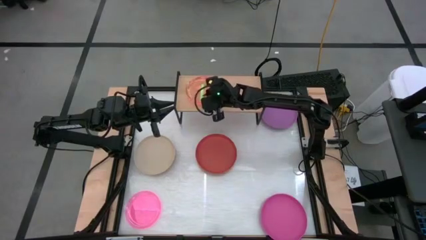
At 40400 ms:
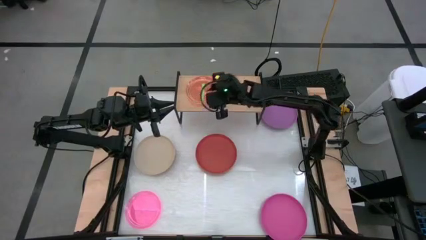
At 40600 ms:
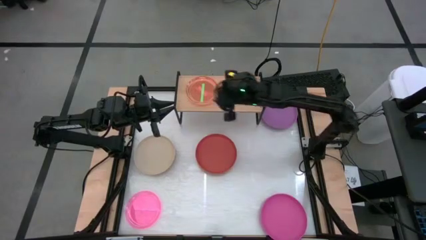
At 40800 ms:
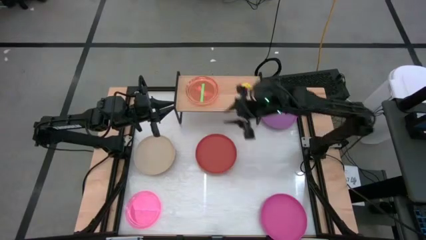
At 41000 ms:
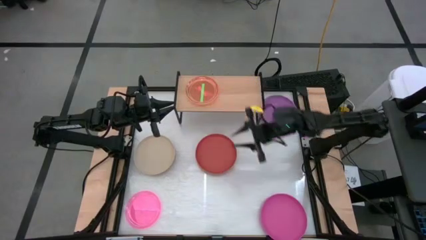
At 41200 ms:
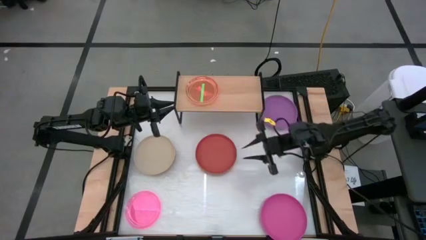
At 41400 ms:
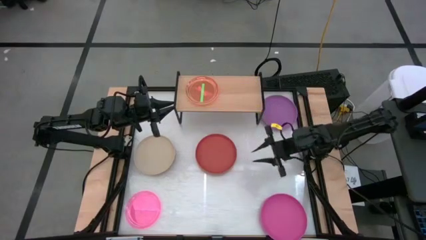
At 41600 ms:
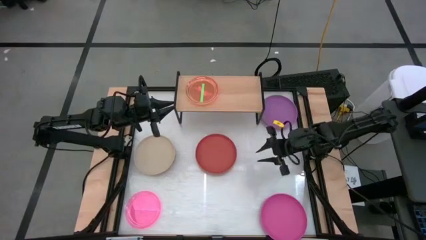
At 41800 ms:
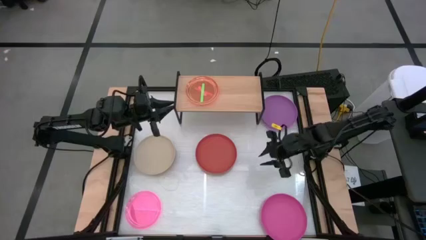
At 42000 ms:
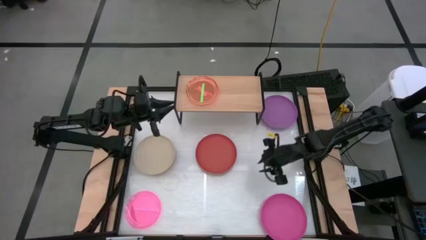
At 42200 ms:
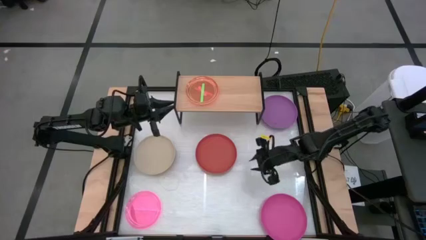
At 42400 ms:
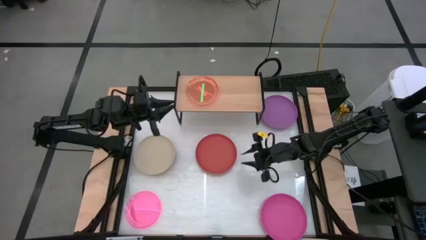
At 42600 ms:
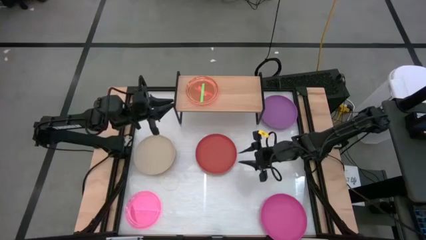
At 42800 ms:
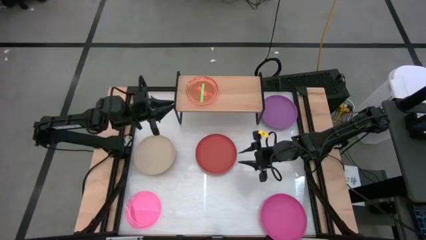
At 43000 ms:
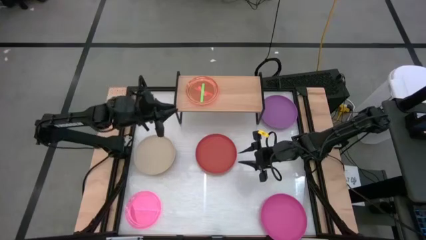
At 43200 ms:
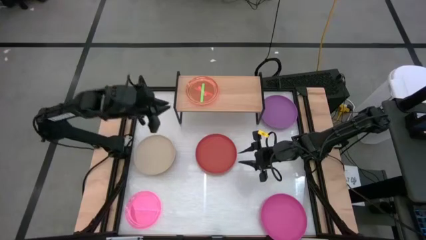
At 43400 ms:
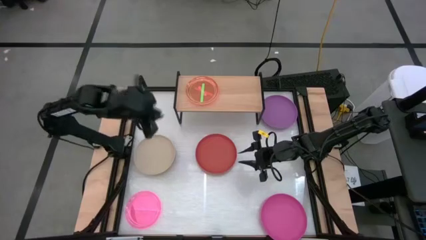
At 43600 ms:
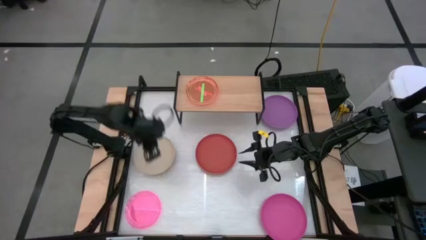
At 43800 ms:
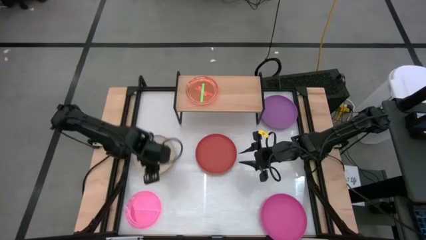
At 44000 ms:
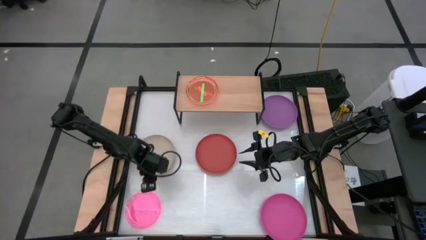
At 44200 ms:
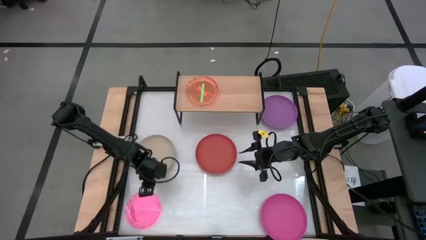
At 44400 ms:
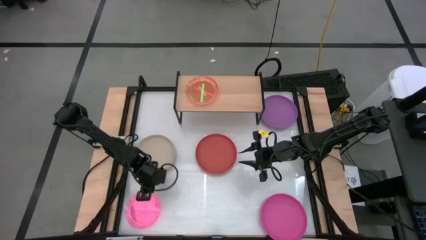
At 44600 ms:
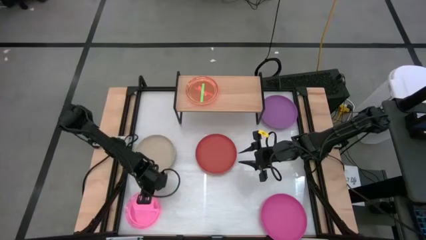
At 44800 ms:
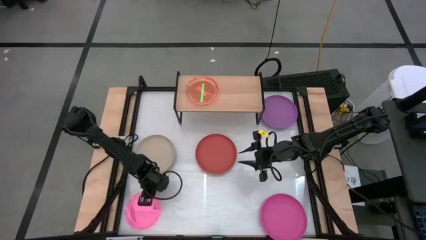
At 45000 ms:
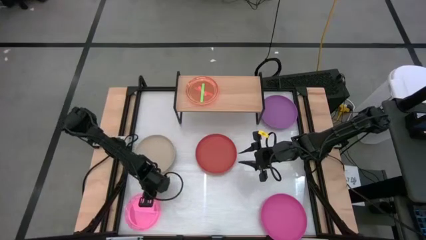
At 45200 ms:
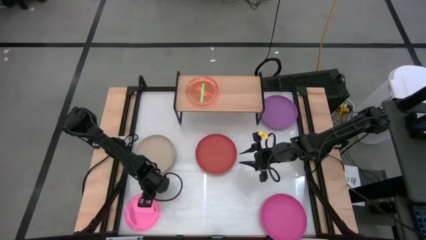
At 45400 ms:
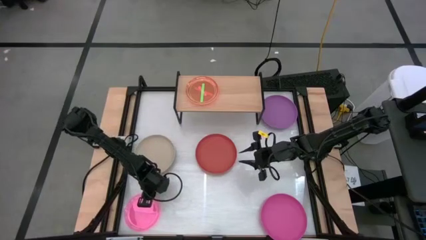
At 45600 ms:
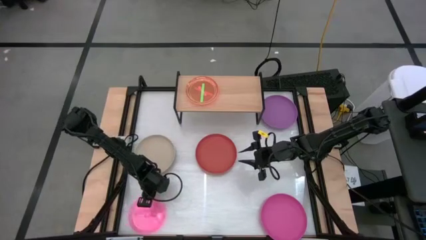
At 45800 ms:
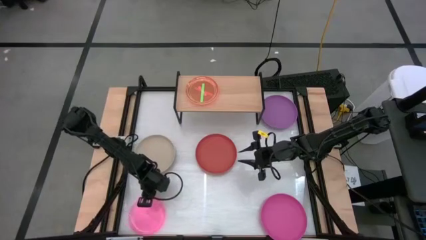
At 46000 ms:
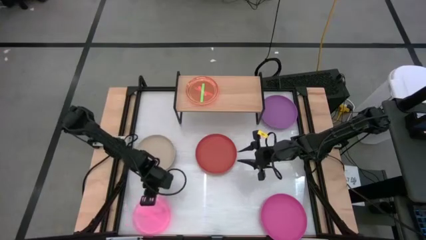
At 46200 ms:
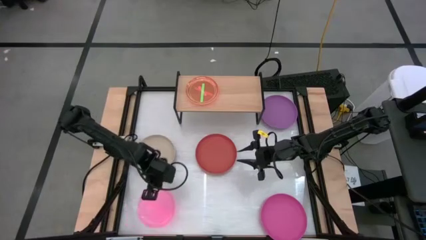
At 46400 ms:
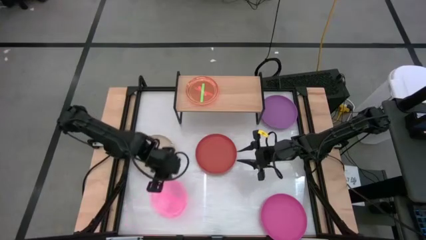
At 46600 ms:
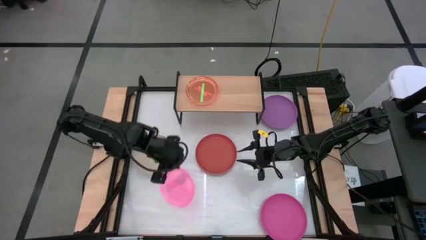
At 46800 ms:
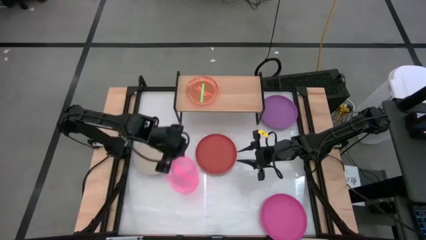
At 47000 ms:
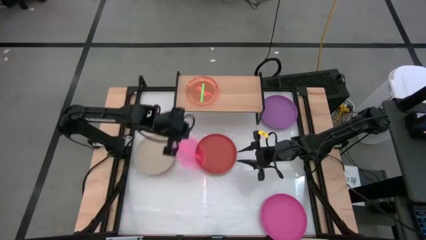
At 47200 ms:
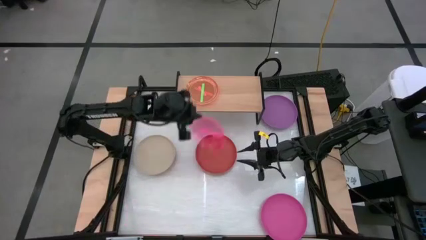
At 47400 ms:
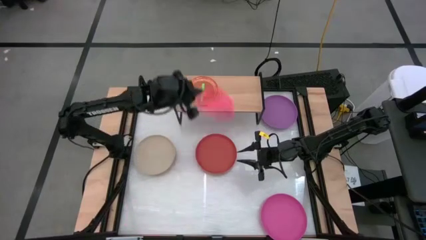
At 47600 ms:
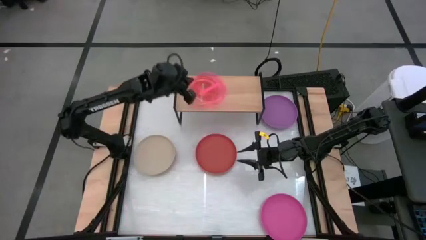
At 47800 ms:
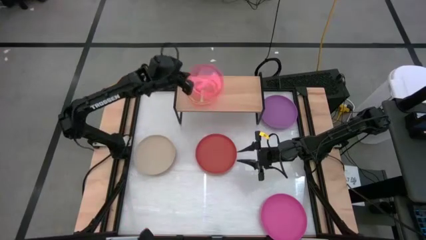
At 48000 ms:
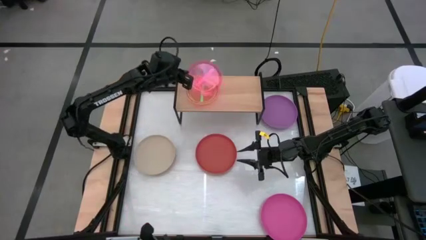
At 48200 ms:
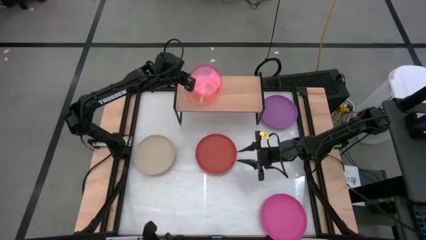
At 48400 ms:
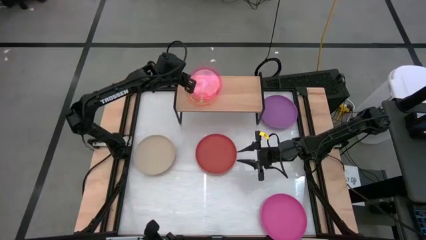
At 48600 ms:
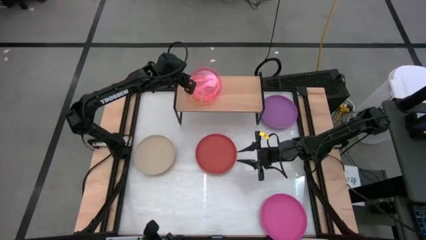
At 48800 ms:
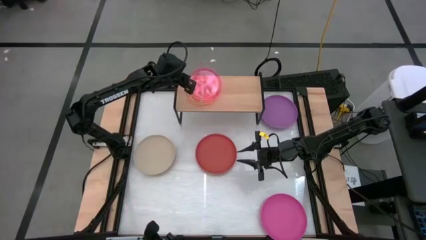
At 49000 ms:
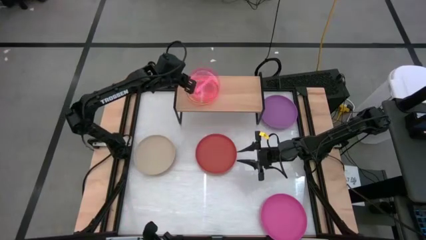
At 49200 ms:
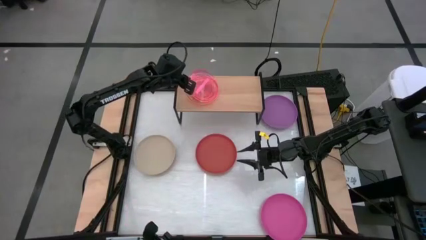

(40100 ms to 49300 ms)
Task: Place and stack plates onto a shelf
Stack the small pink plate on top of the small green plate on the shelf

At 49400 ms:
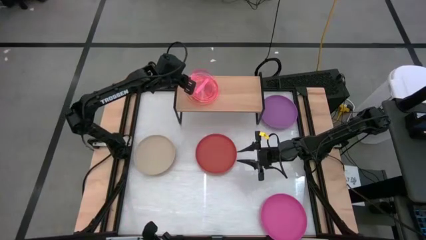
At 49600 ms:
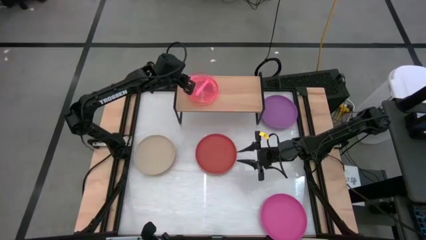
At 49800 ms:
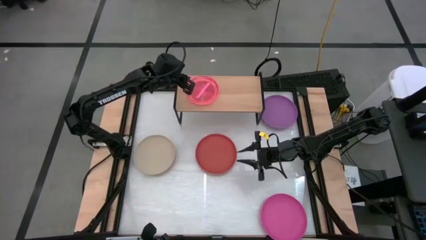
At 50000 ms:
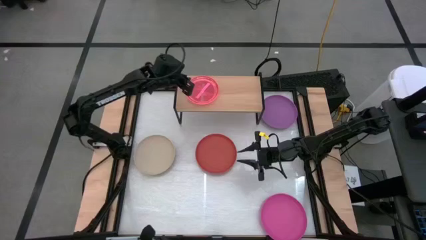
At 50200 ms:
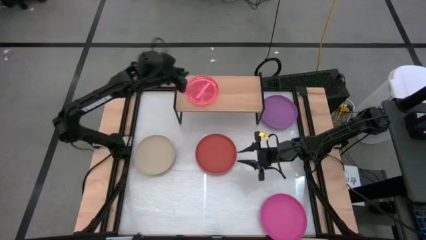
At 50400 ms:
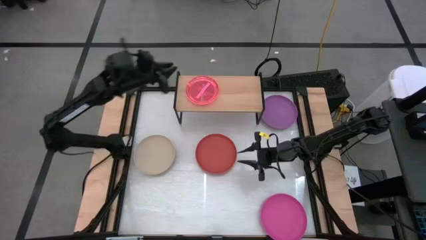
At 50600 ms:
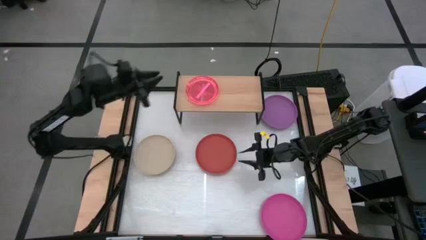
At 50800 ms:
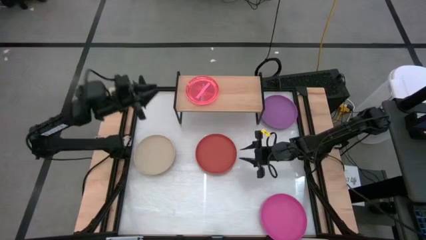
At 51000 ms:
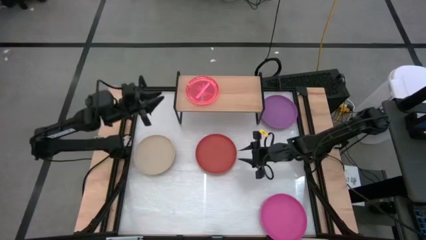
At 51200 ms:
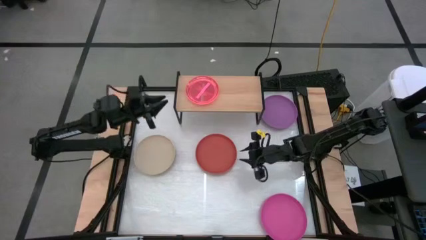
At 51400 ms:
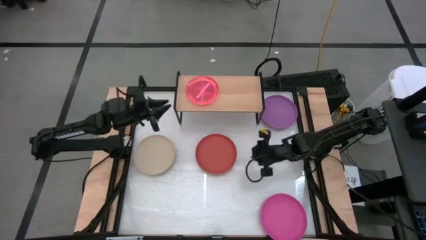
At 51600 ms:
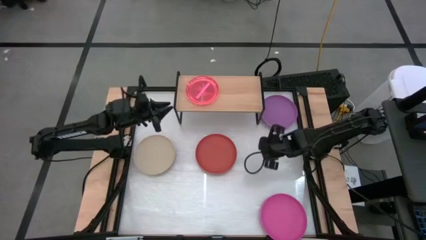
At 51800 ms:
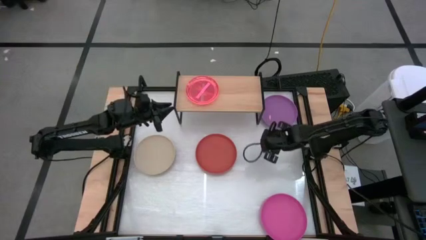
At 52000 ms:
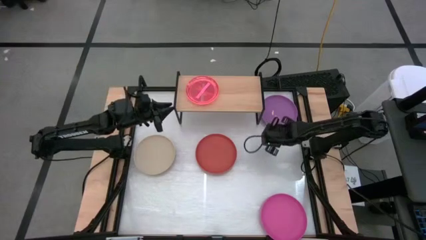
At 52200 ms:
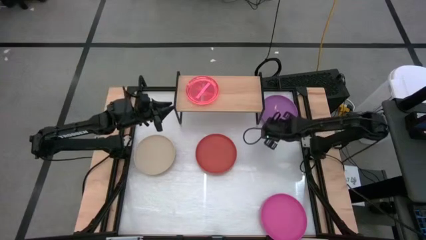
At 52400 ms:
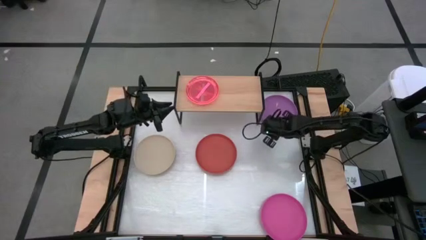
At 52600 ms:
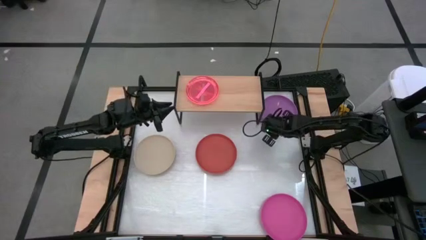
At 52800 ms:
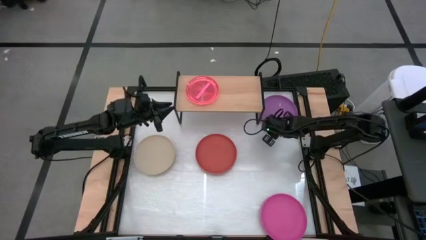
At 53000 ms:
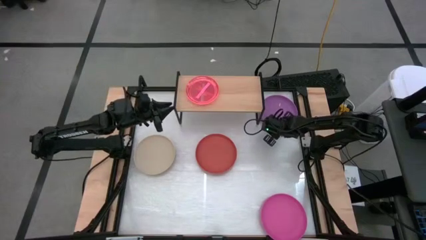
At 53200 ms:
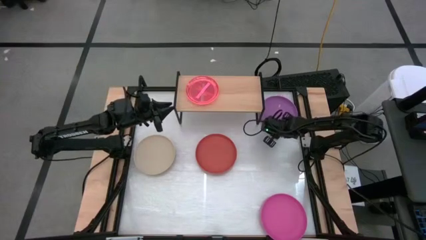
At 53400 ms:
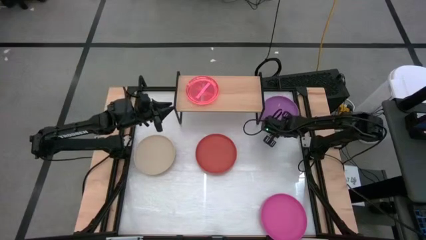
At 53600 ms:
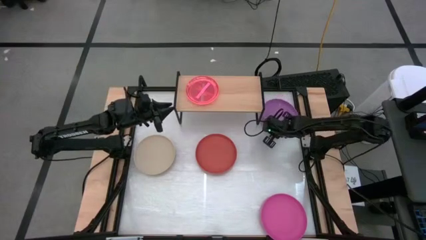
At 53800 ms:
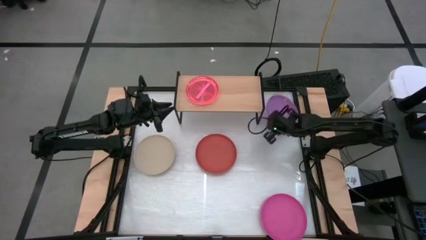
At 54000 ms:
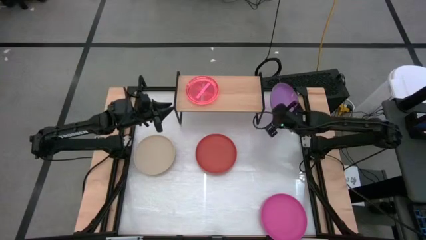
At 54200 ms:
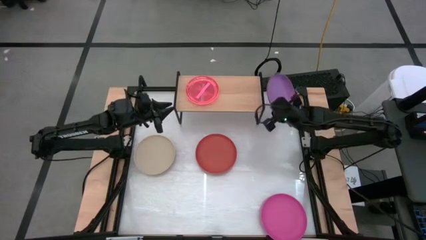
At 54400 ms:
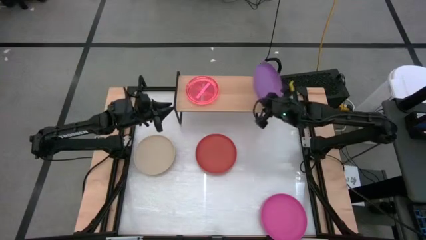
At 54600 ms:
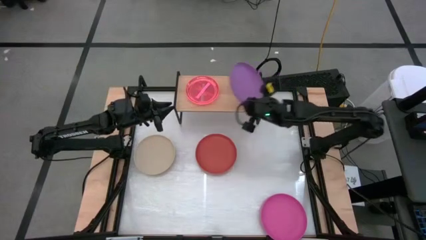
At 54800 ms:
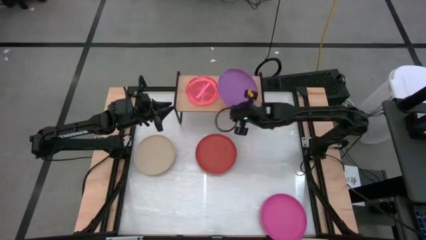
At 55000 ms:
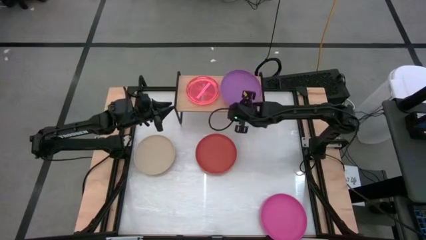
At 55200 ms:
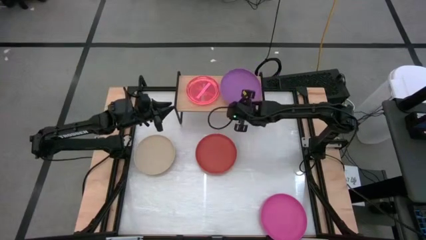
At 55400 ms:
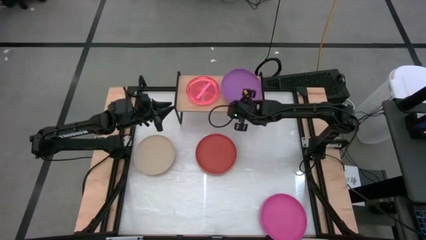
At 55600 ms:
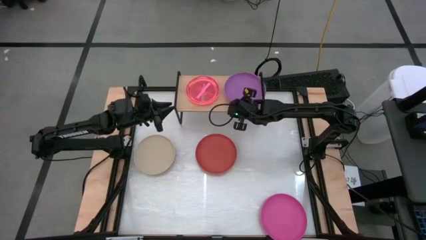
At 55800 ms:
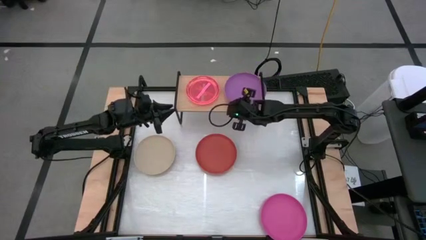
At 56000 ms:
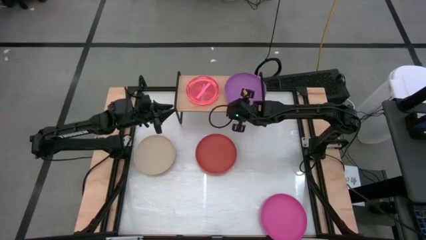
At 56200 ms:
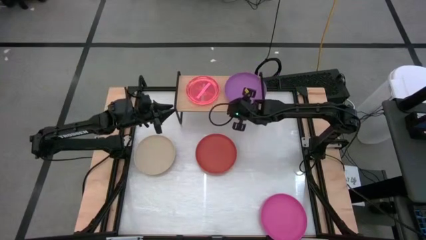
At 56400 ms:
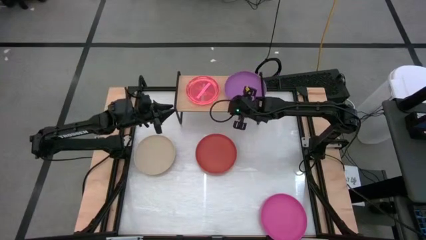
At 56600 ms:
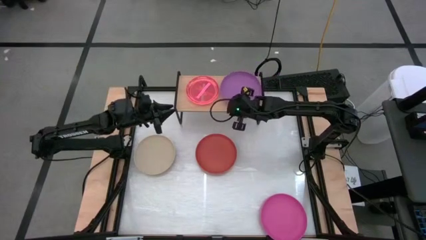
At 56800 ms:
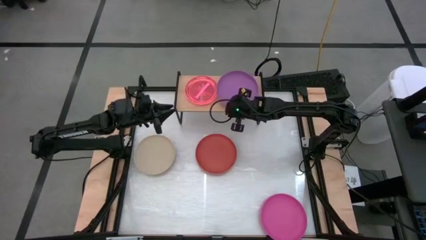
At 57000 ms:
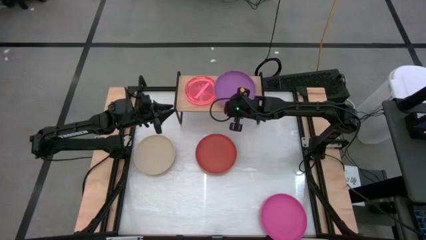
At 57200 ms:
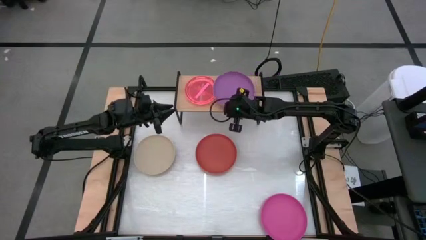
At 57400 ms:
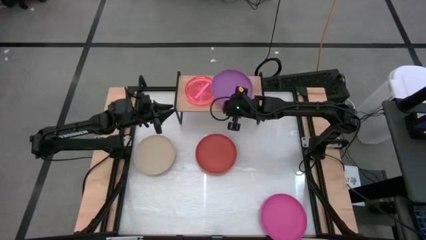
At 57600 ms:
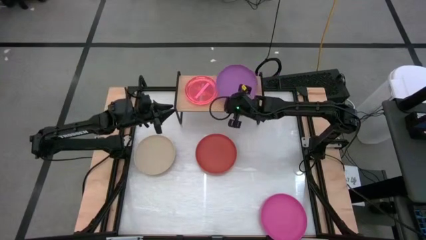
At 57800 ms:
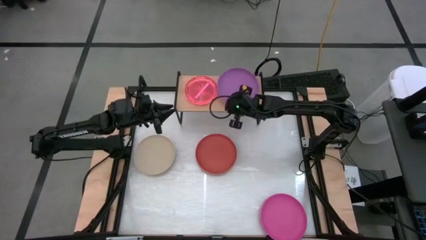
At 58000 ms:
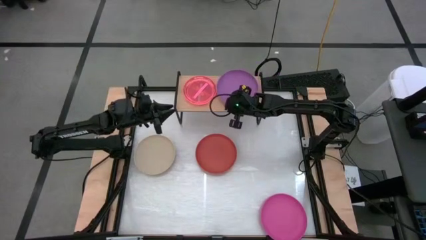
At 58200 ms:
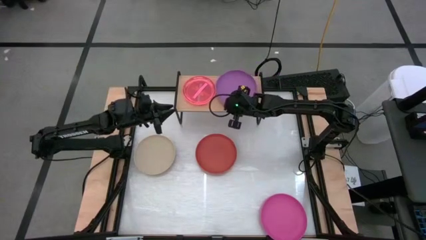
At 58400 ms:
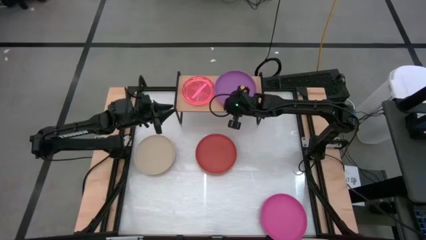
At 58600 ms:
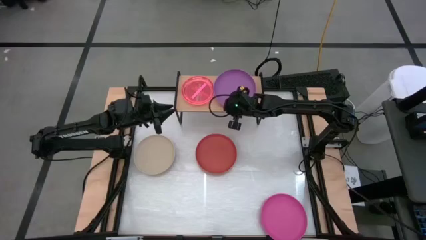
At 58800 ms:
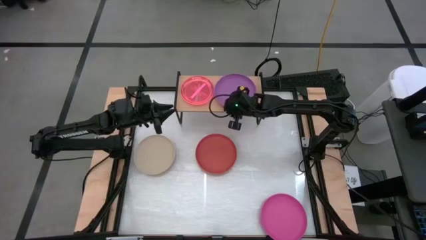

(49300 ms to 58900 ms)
Put the big purple plate on the shelf
